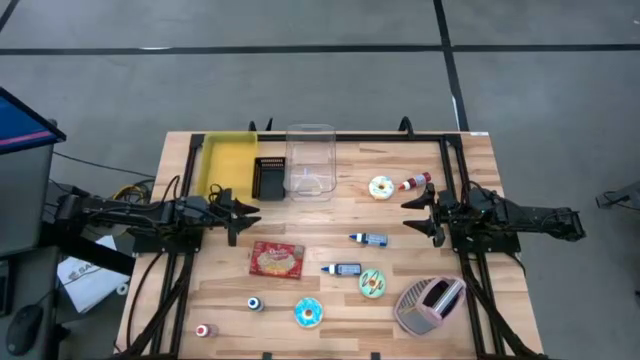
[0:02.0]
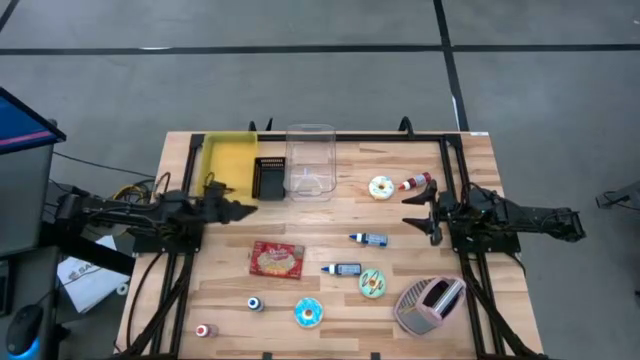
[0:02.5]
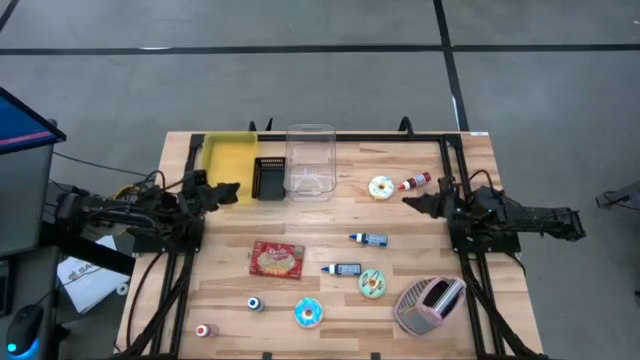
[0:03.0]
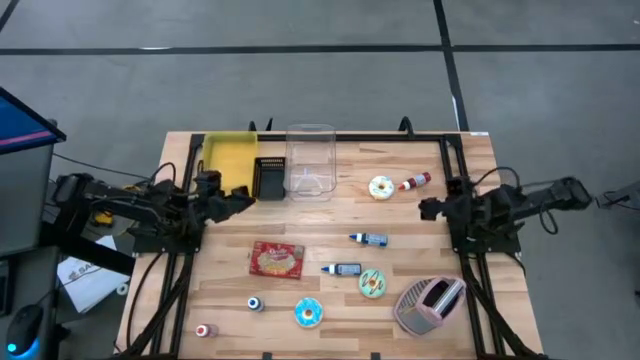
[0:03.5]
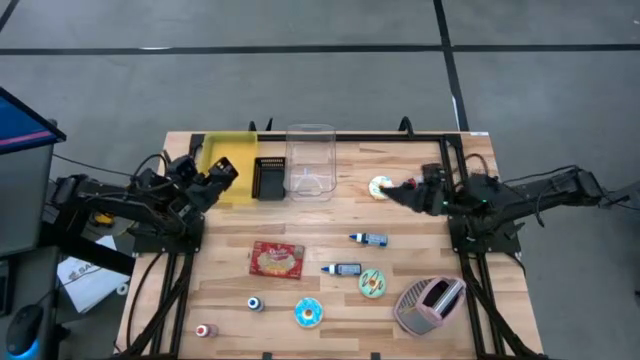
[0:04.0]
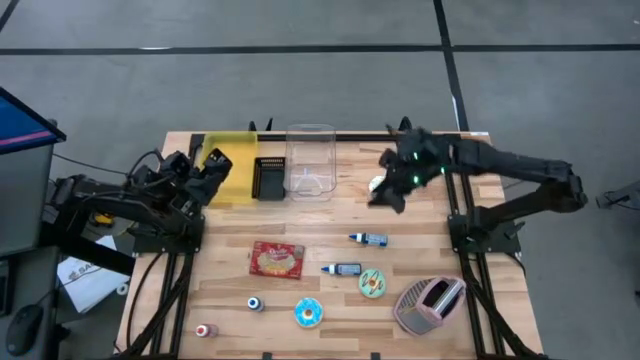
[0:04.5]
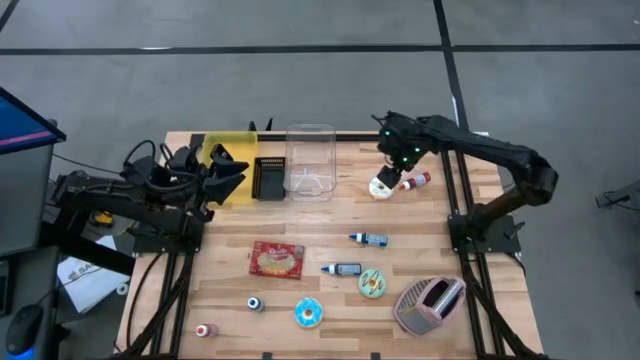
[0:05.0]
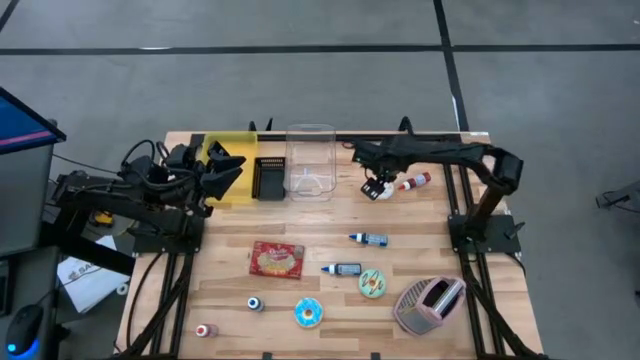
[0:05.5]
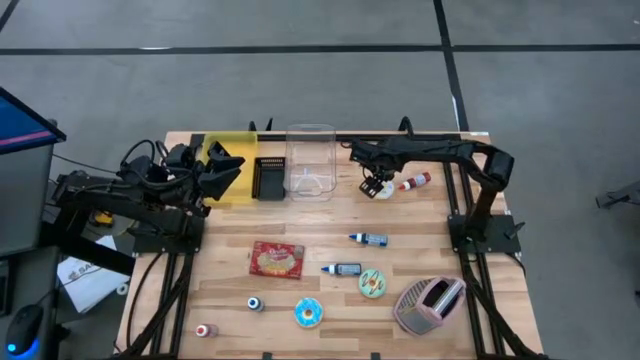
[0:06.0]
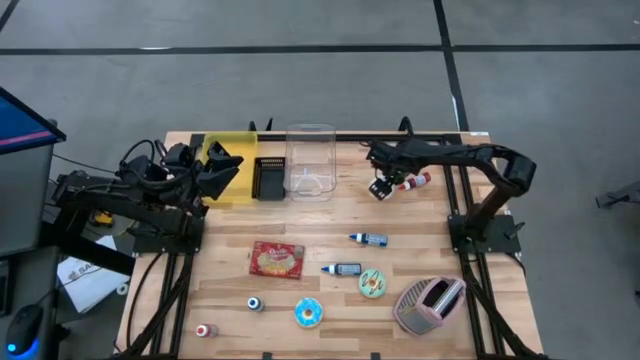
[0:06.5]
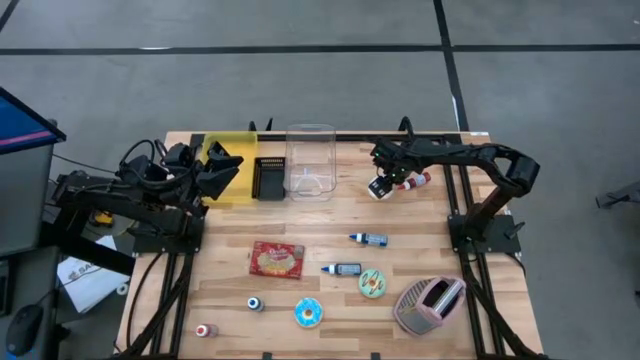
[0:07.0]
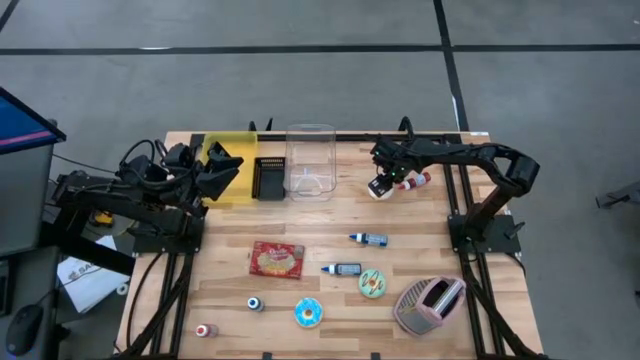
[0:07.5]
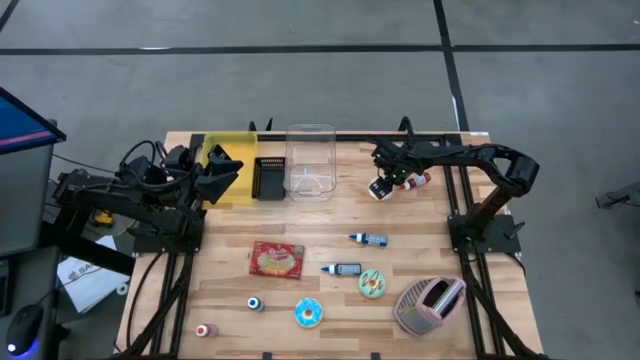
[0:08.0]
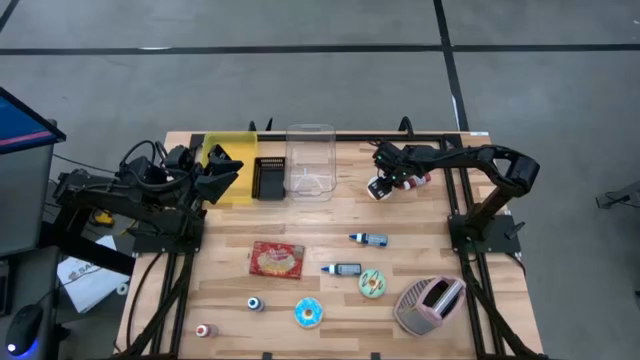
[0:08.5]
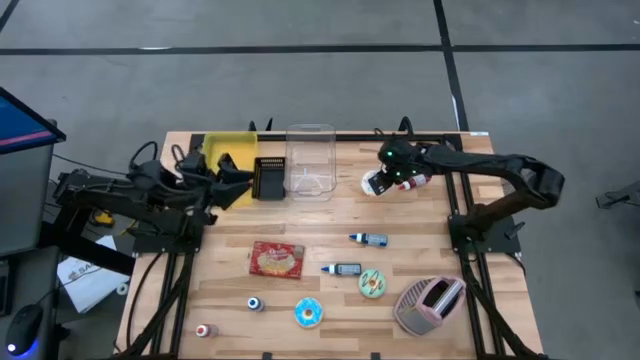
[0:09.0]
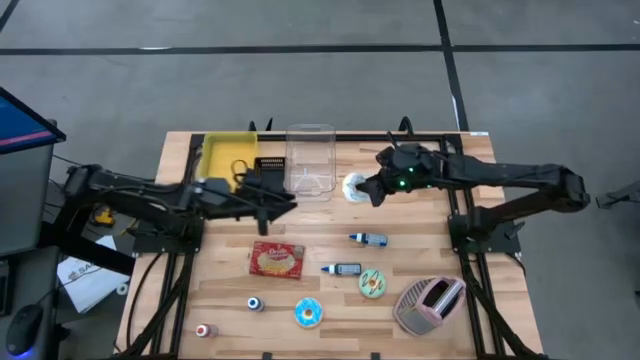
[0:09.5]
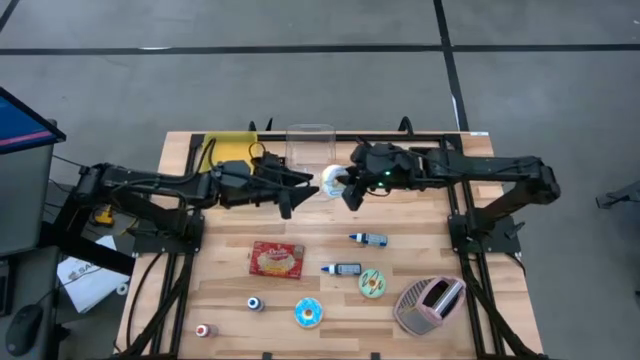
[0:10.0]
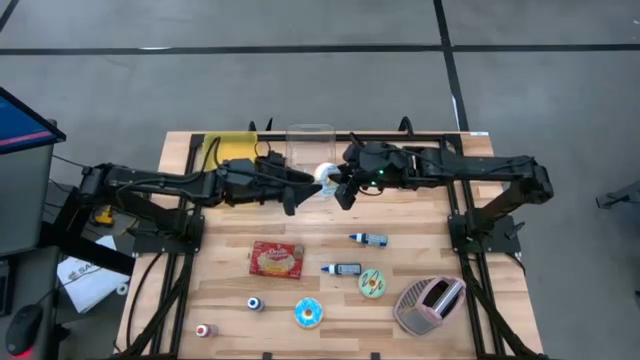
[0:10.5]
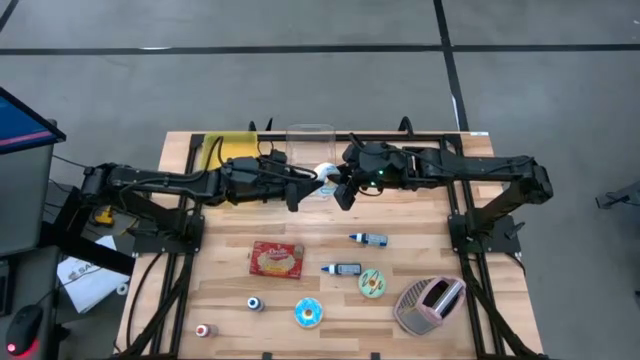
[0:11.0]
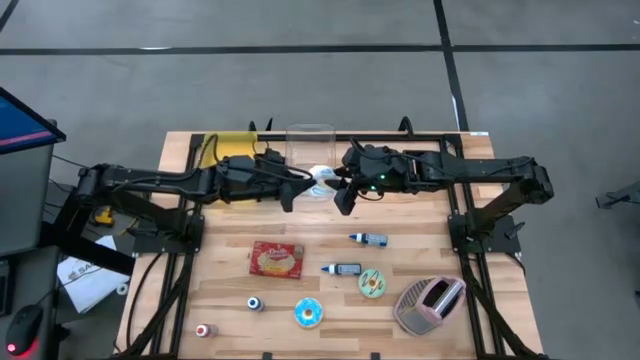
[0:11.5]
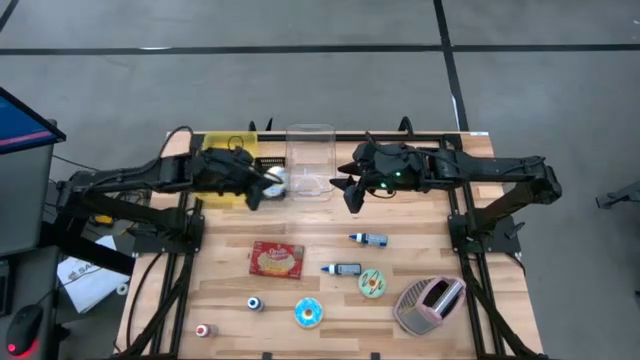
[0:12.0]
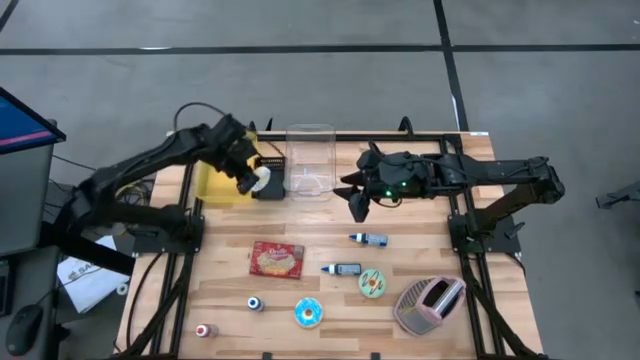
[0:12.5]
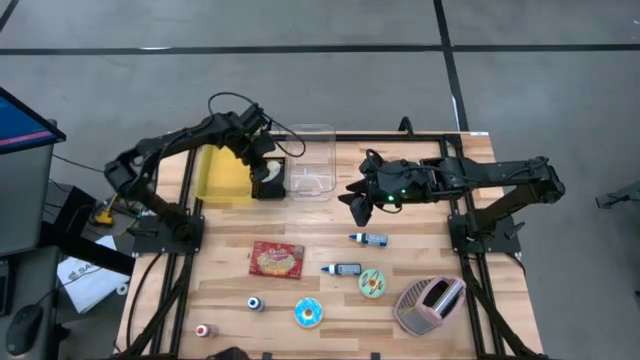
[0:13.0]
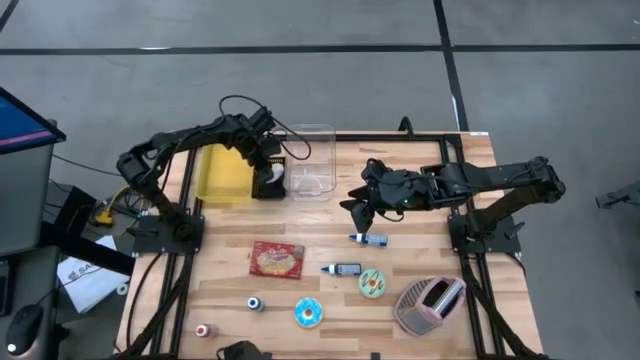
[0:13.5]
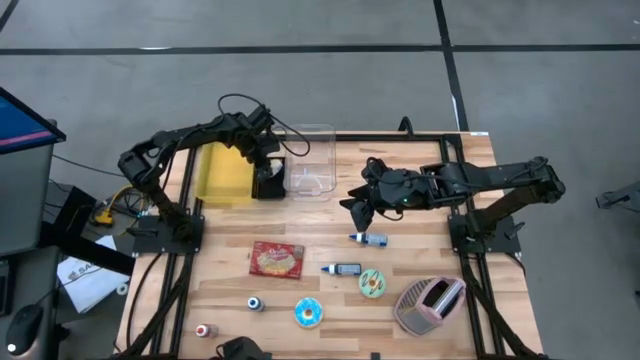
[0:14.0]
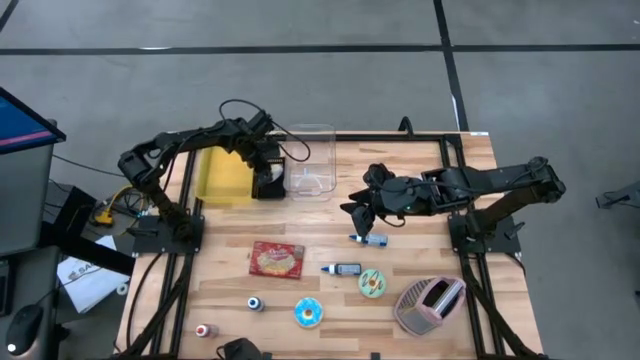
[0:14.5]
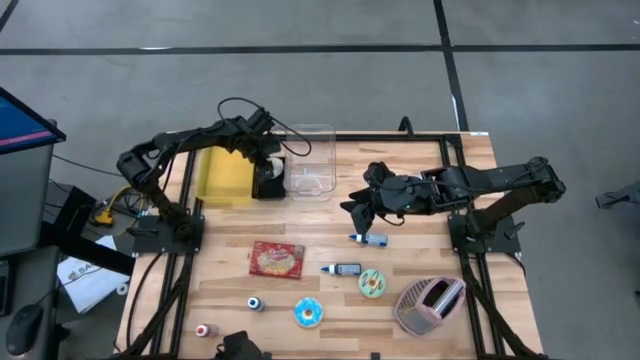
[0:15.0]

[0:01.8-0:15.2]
Put the white doughnut into the black bin

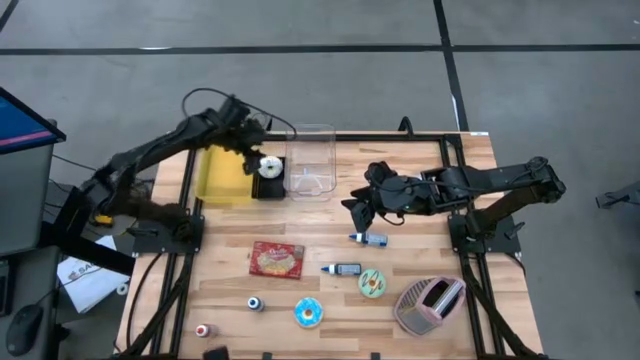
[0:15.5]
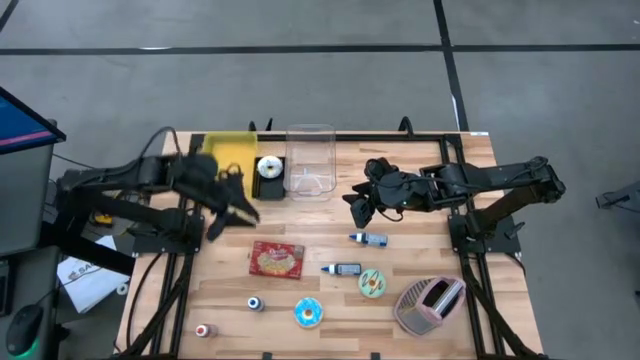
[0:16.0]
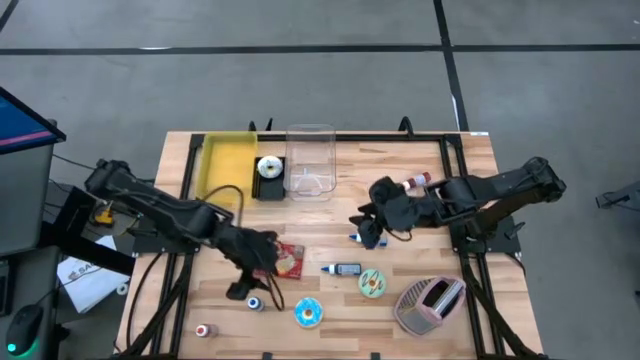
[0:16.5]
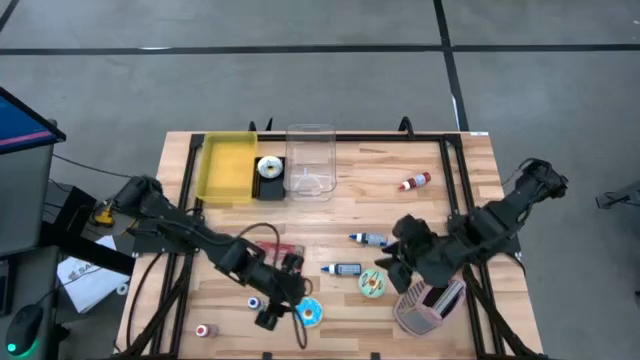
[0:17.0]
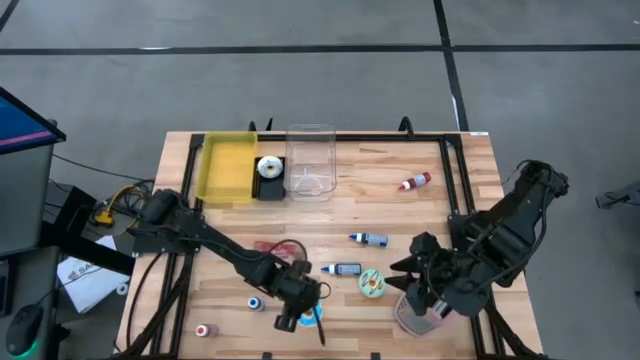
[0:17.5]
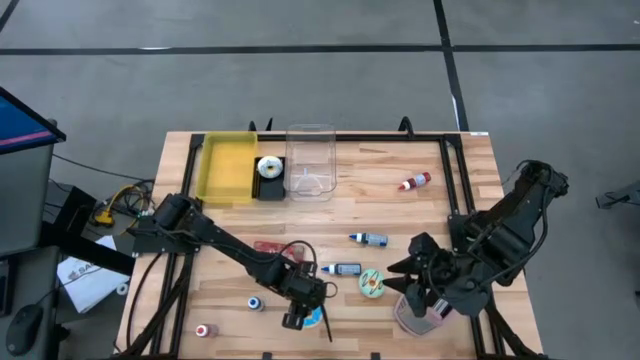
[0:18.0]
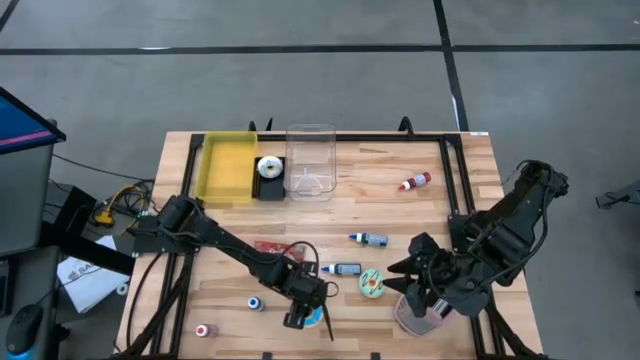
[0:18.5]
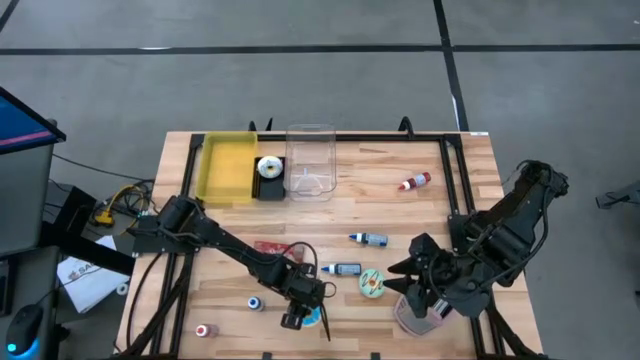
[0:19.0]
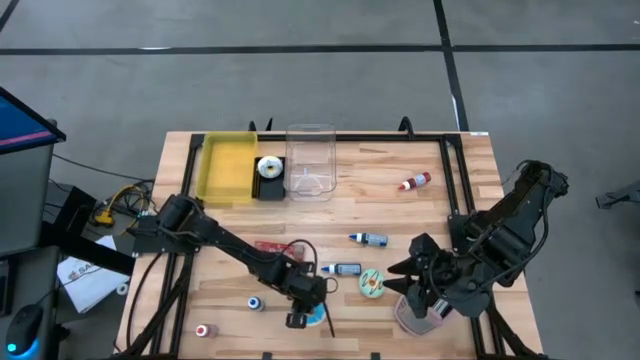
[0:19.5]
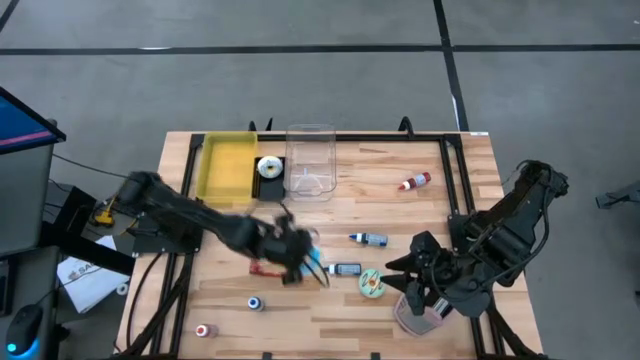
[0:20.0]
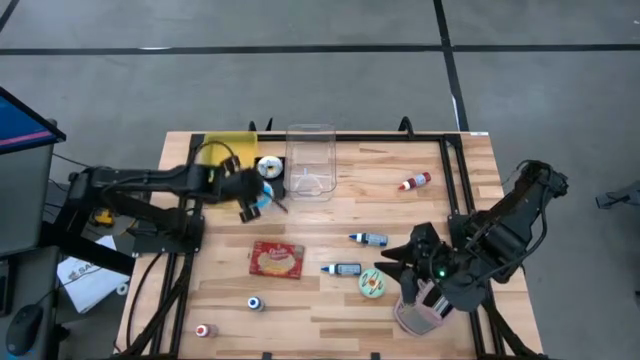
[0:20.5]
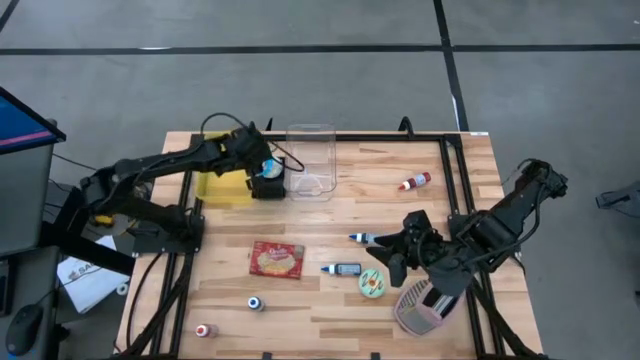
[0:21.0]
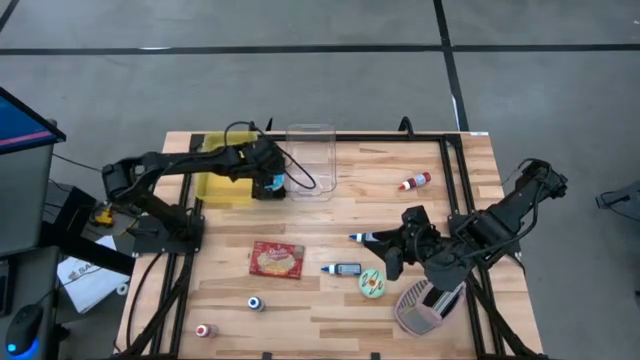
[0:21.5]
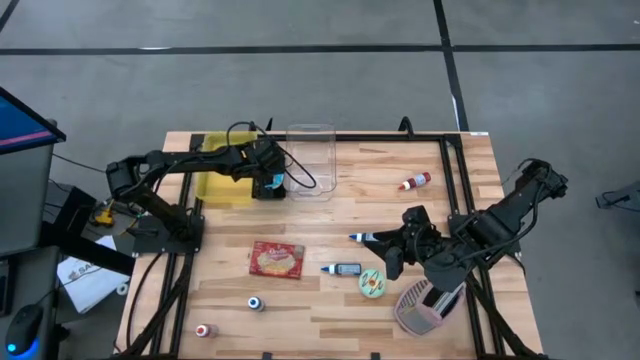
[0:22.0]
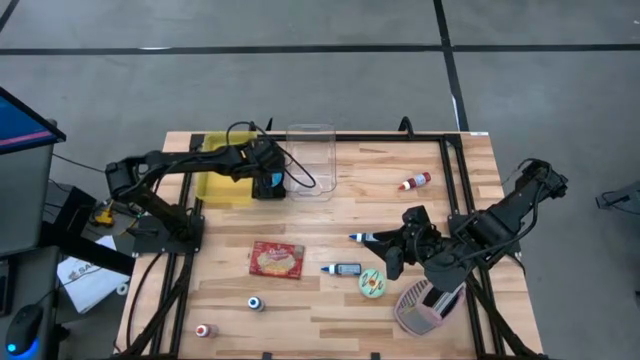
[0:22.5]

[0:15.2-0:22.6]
Put the blue doughnut into the black bin
